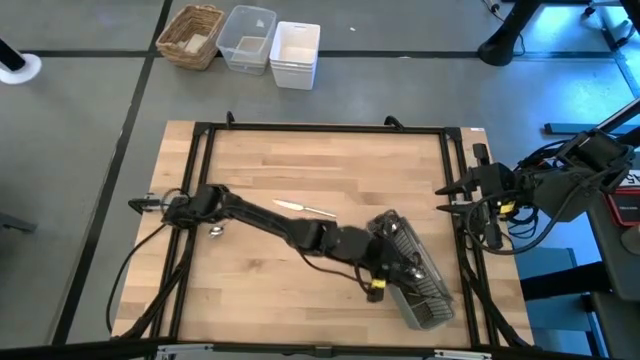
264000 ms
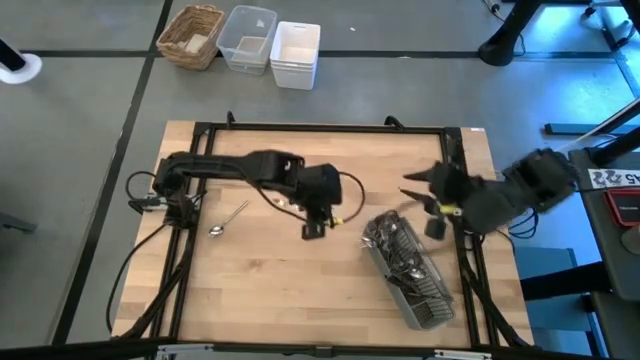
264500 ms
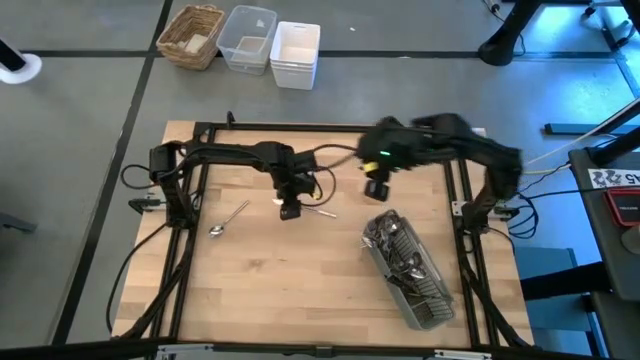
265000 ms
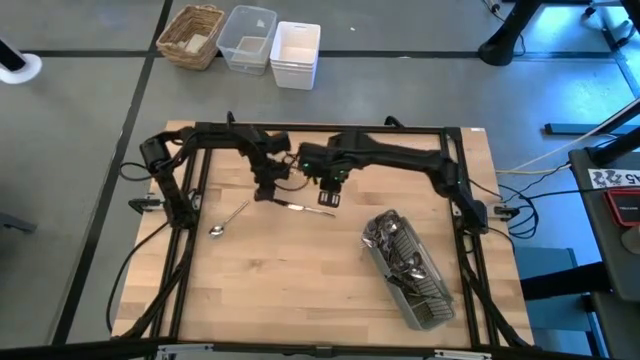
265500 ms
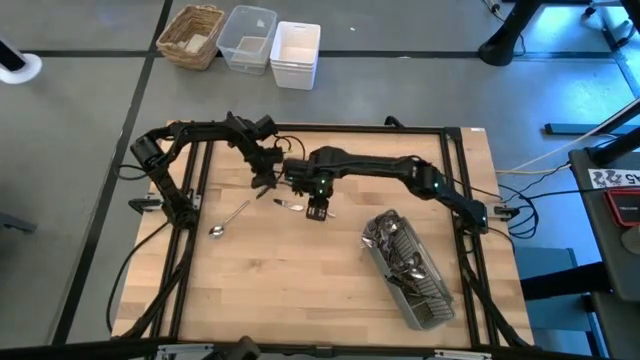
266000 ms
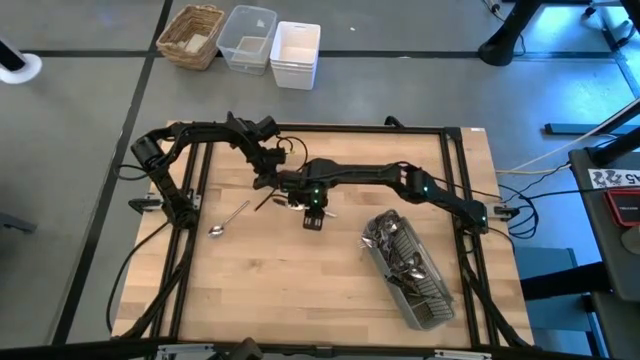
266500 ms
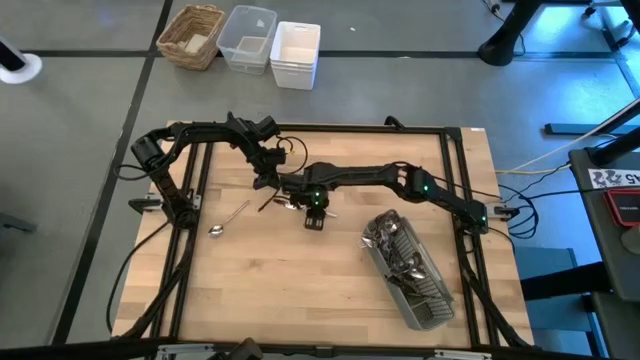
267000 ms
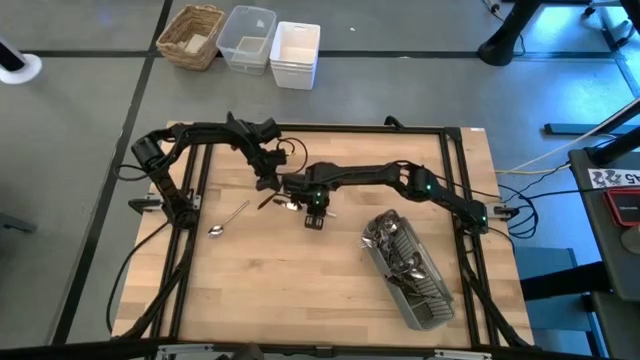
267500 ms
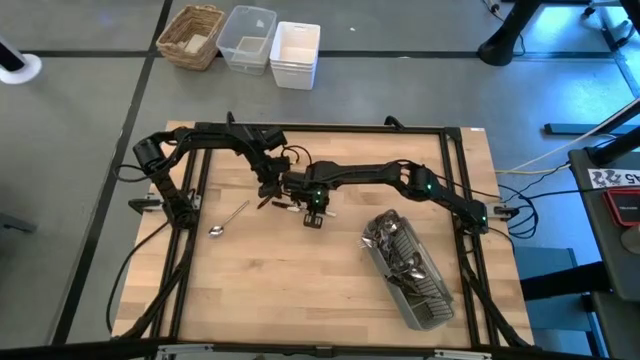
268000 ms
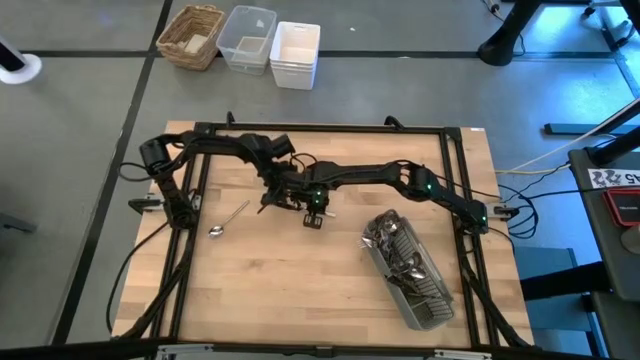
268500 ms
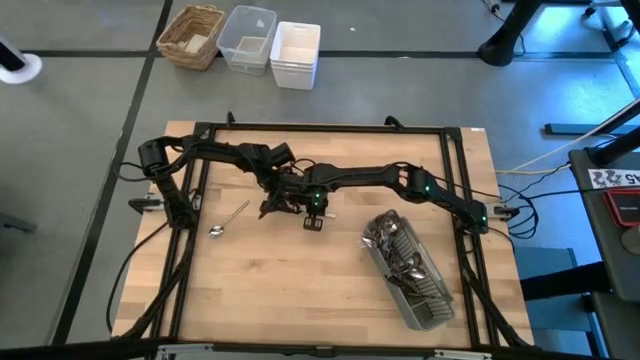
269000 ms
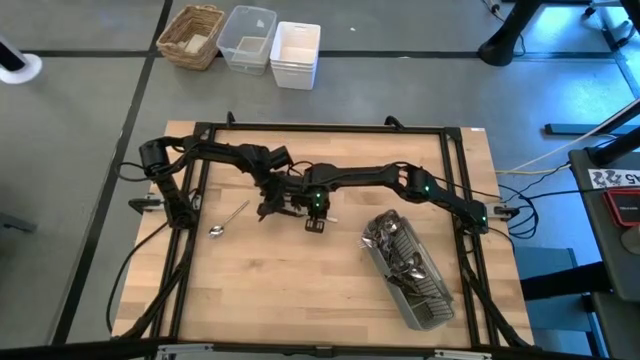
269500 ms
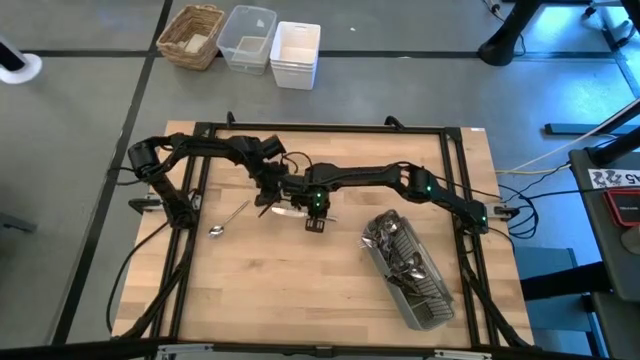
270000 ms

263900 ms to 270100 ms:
Task: Sort silverware
Put the silver table knife into the gray silverware basket

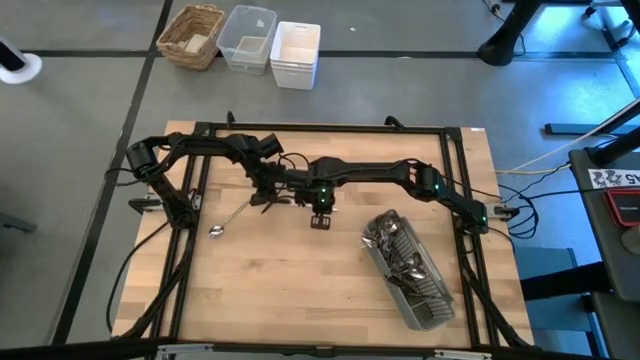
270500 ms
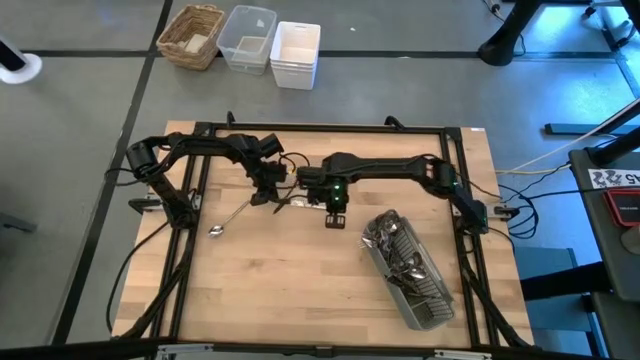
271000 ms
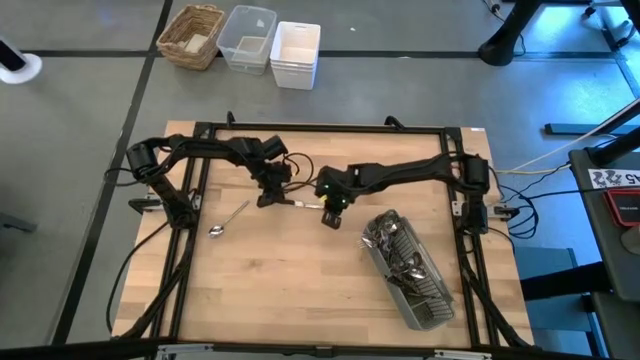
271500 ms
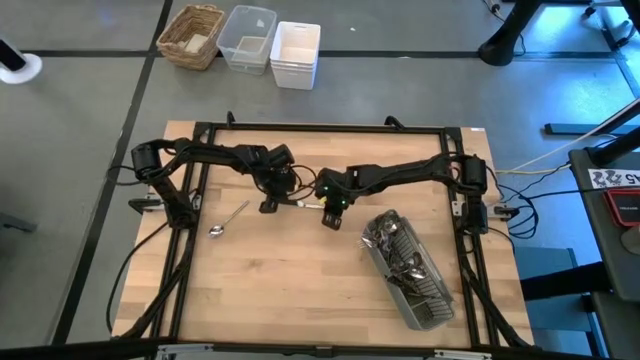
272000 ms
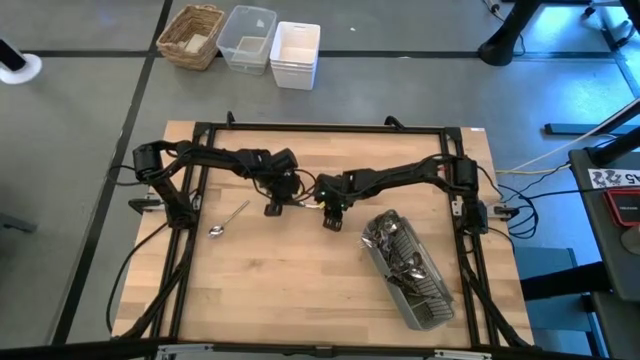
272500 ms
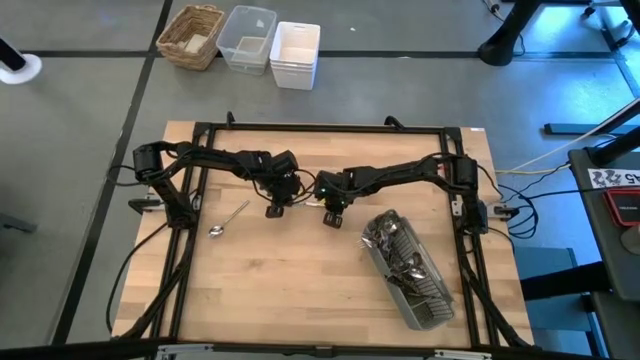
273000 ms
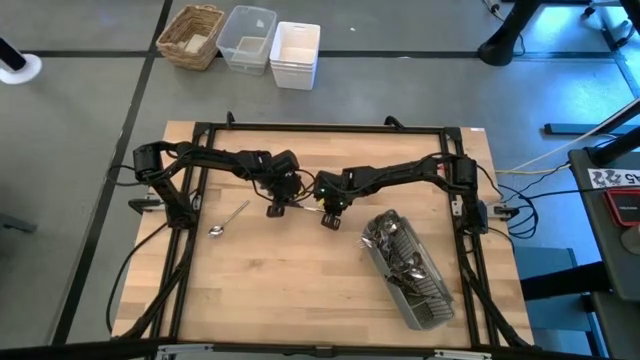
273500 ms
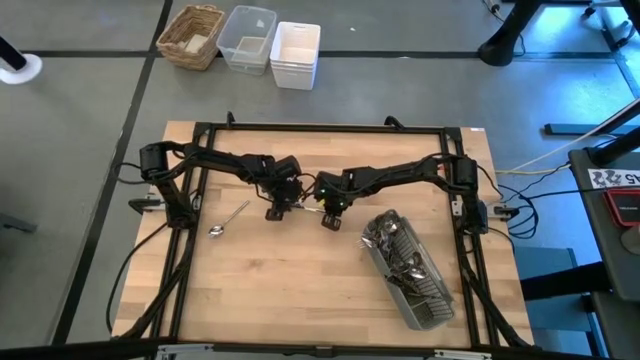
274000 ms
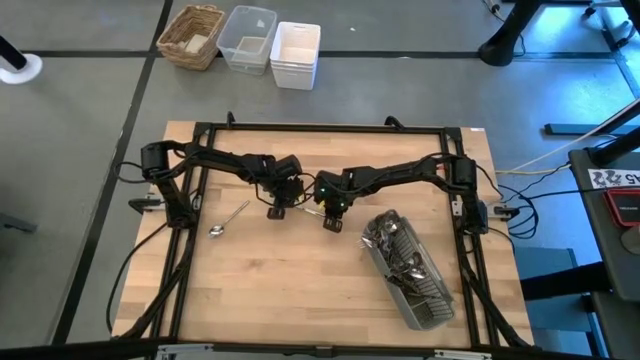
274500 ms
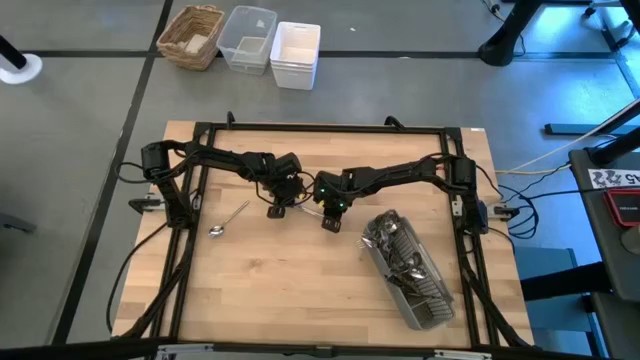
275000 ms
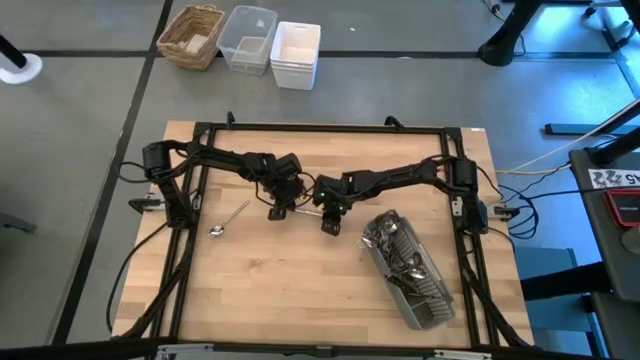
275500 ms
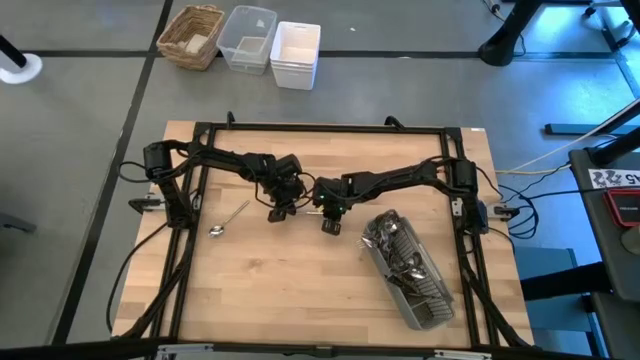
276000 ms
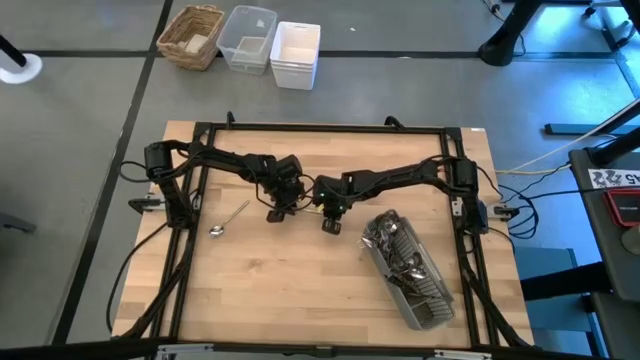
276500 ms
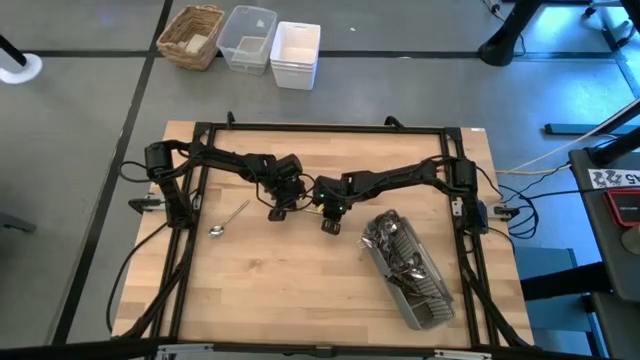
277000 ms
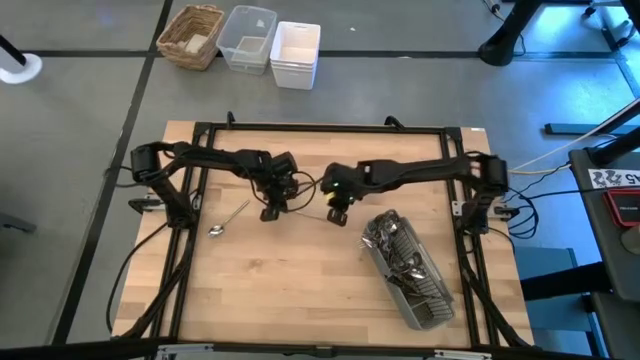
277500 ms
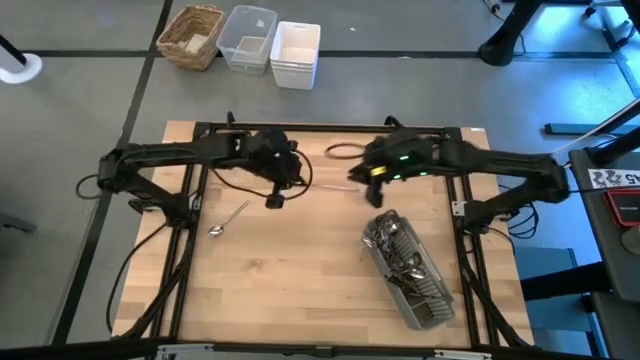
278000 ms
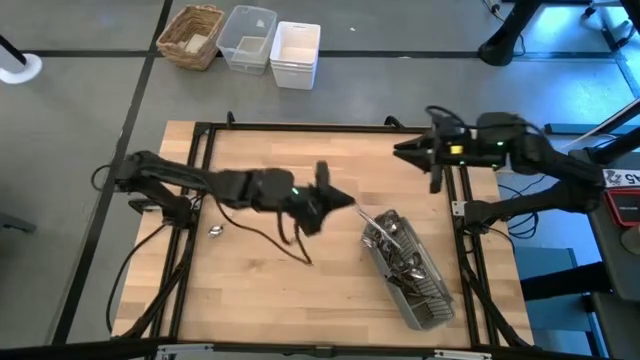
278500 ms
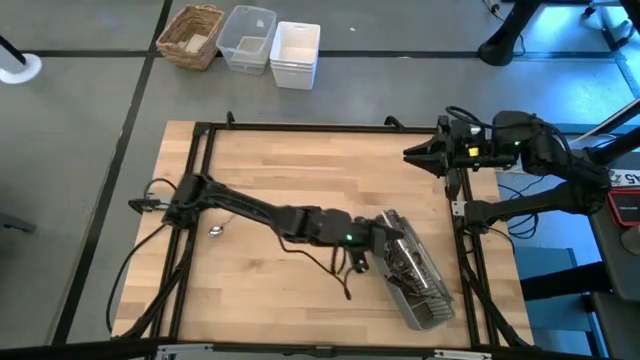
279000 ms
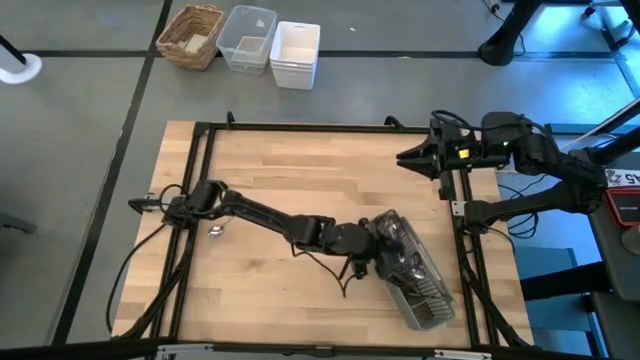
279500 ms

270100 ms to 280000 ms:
Put the silver table knife into the gray silverware basket

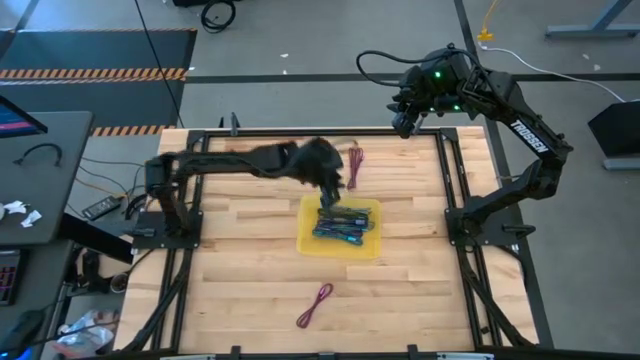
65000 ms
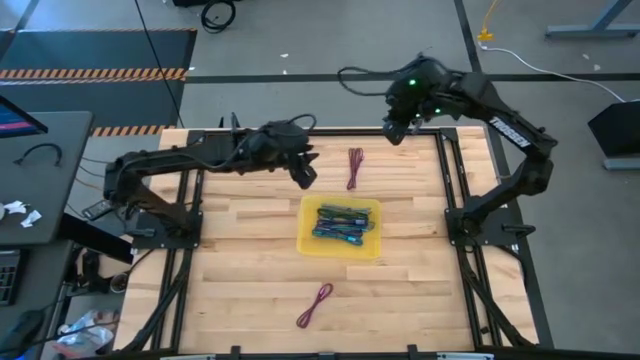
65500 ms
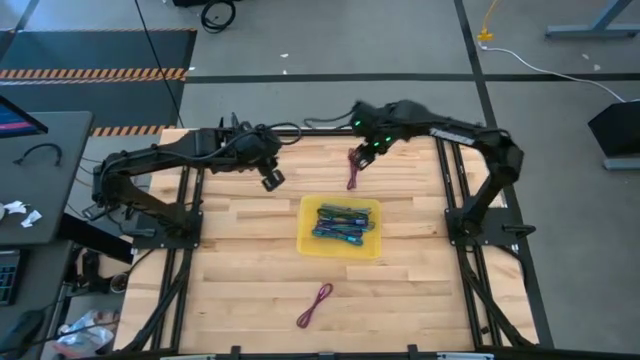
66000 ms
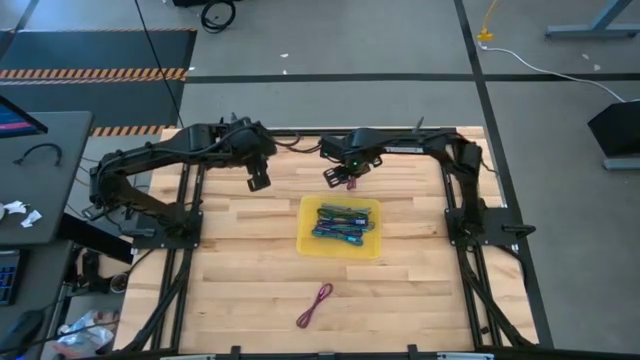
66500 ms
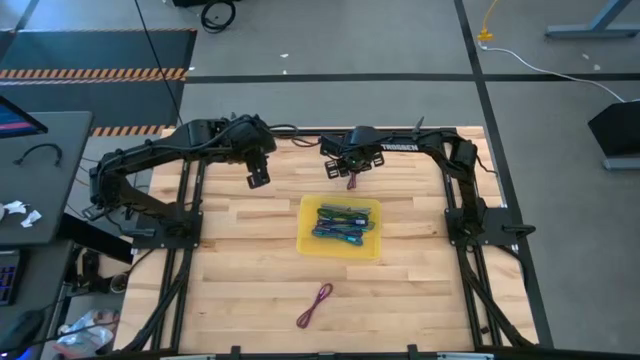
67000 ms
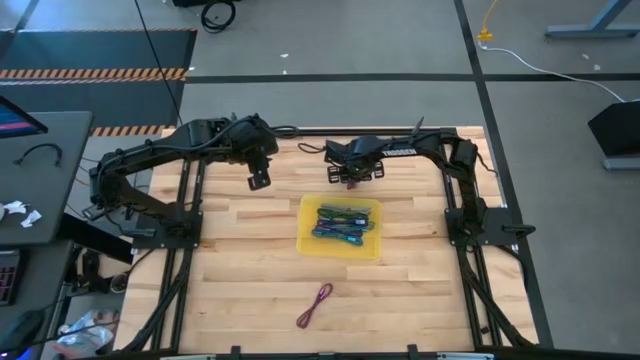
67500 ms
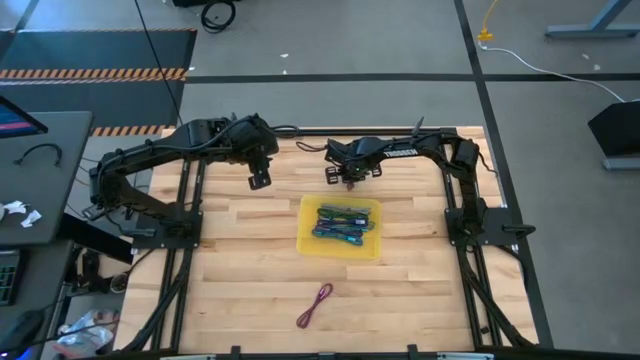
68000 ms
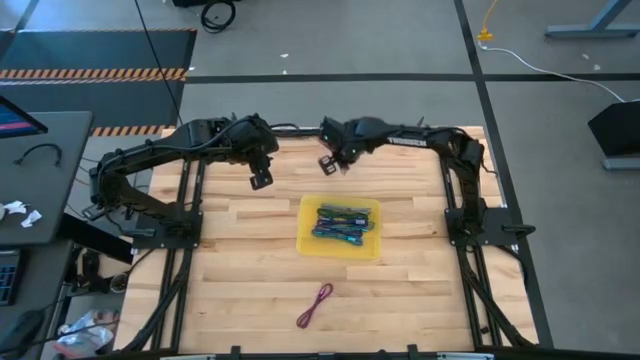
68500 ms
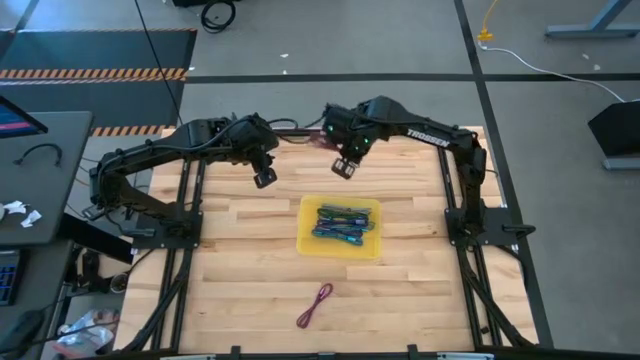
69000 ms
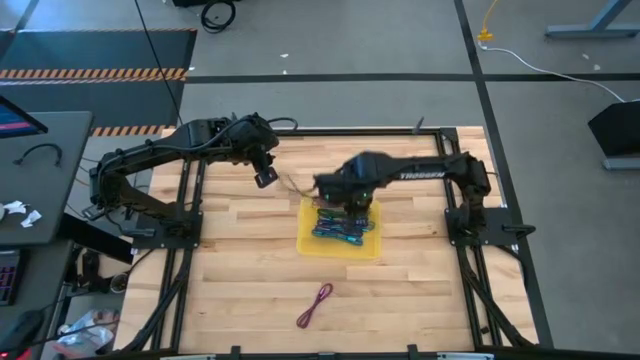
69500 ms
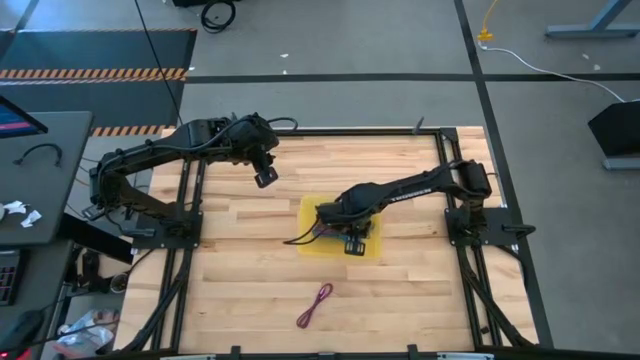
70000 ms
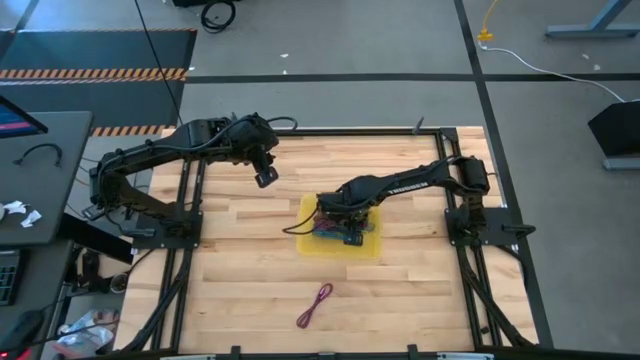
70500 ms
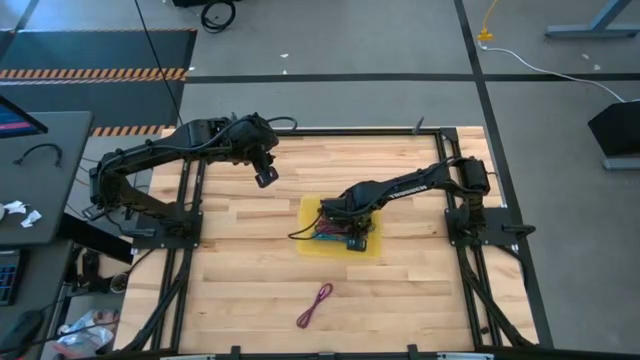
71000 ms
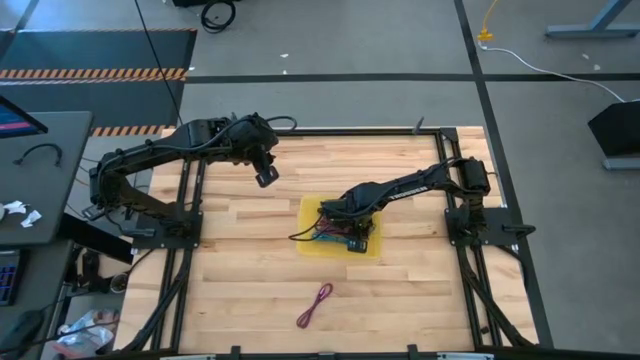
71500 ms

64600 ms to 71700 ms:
Task: Pick and place USB-C Cables
Put the top pink charger cable into the yellow bin
